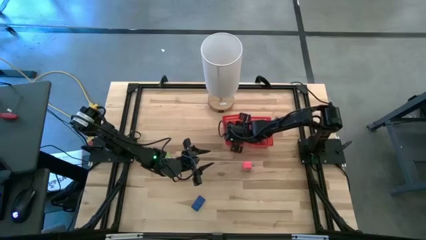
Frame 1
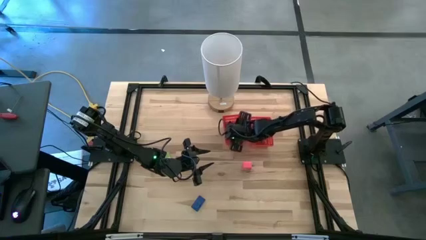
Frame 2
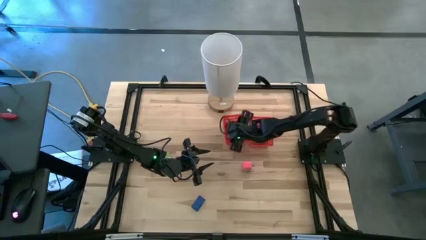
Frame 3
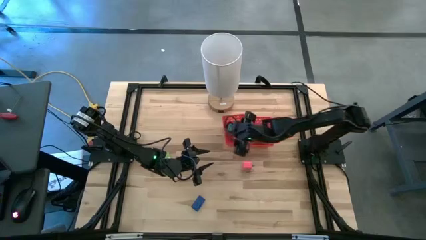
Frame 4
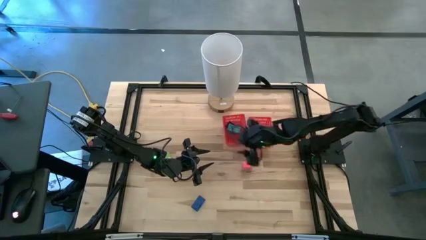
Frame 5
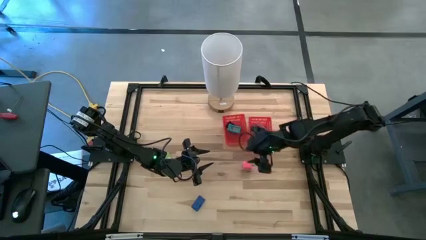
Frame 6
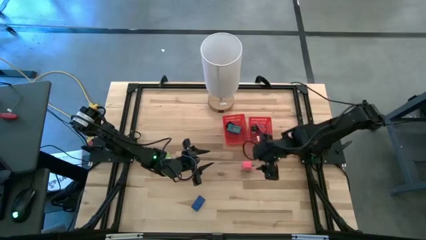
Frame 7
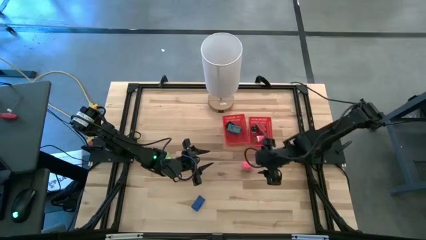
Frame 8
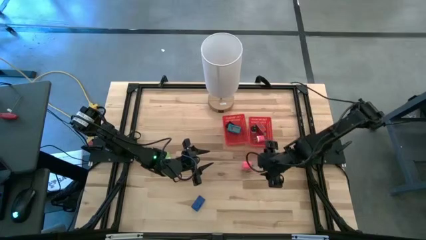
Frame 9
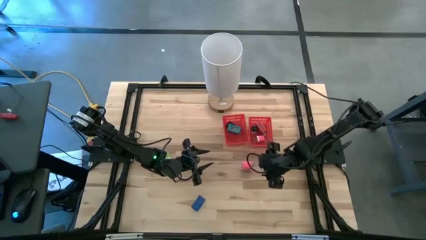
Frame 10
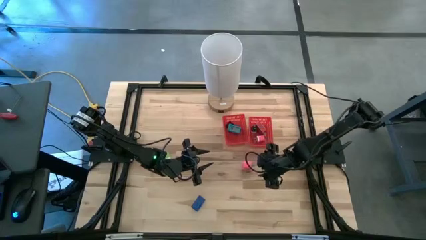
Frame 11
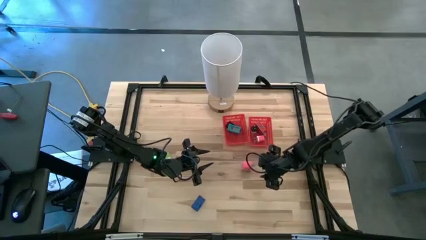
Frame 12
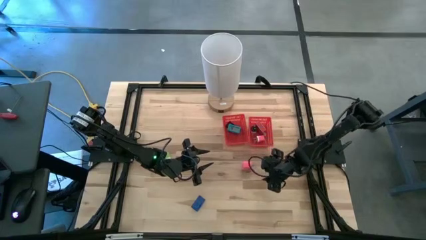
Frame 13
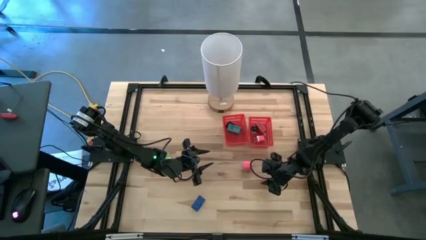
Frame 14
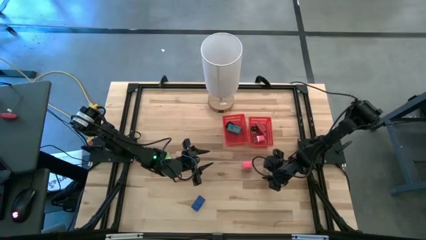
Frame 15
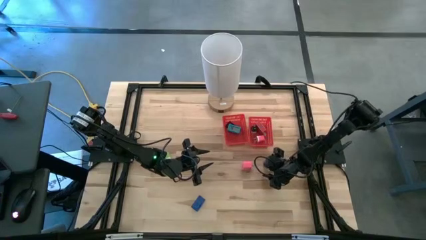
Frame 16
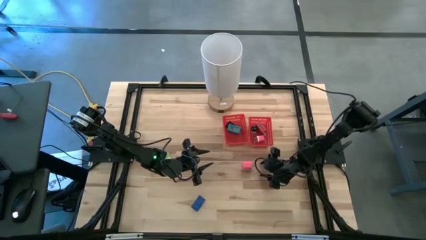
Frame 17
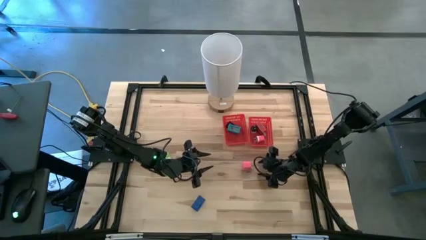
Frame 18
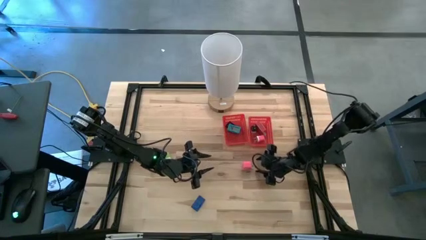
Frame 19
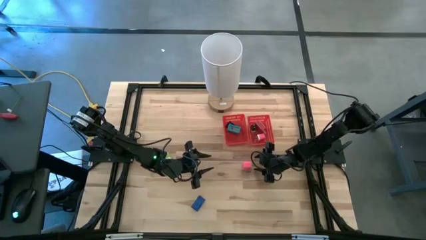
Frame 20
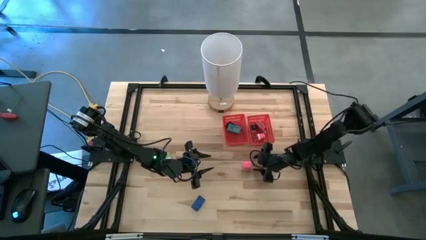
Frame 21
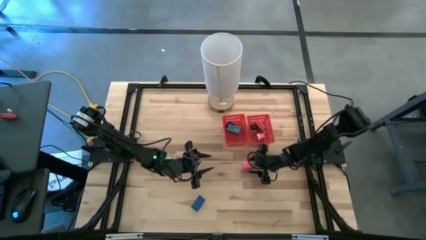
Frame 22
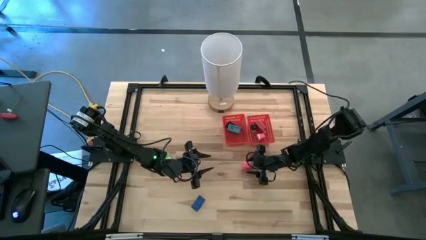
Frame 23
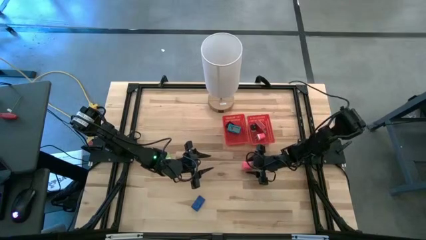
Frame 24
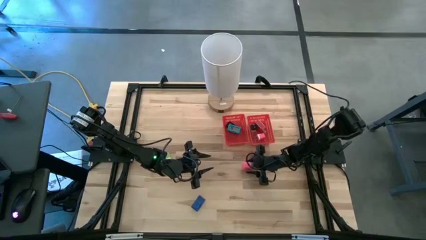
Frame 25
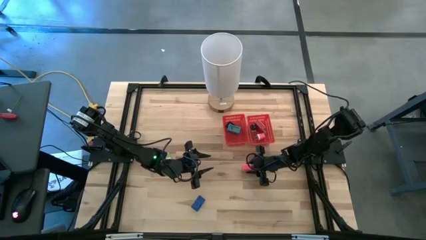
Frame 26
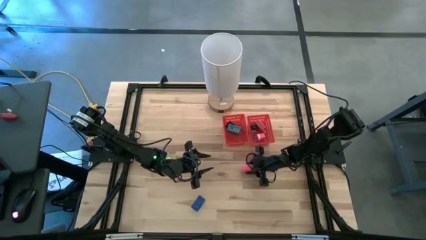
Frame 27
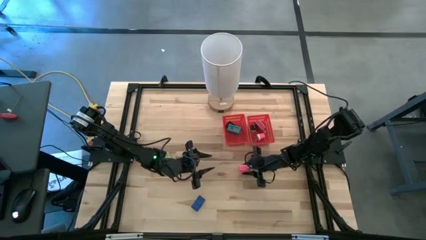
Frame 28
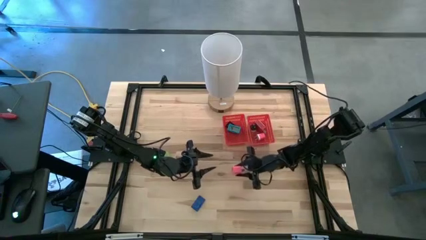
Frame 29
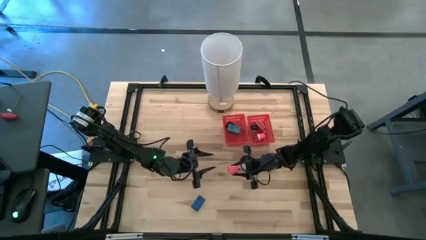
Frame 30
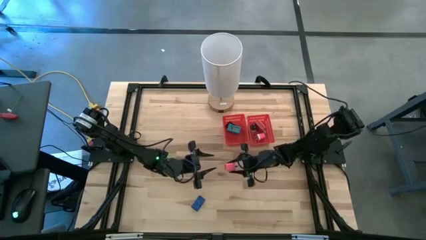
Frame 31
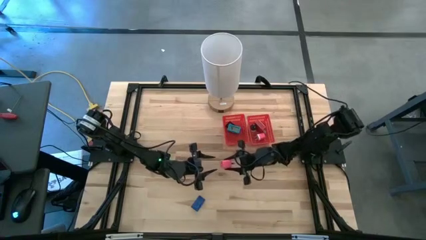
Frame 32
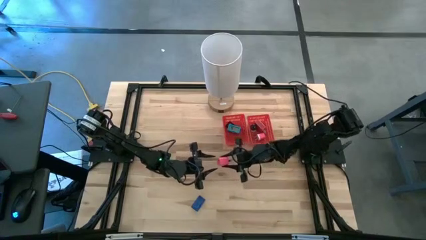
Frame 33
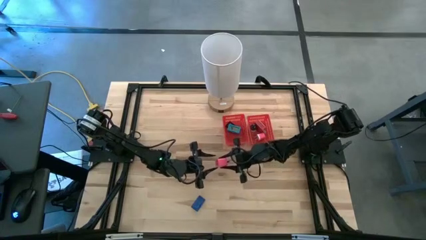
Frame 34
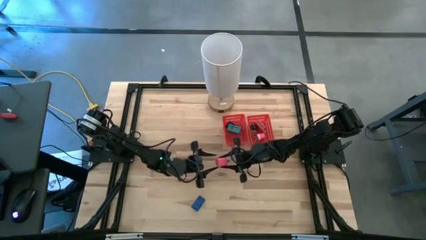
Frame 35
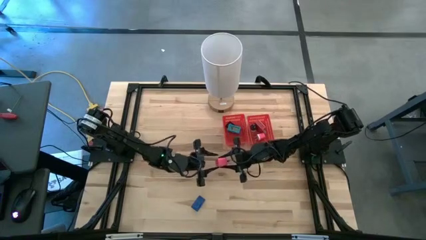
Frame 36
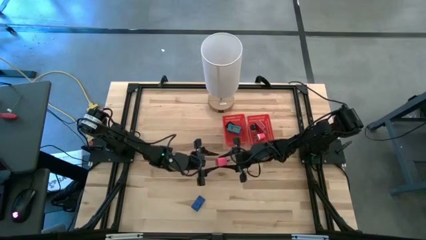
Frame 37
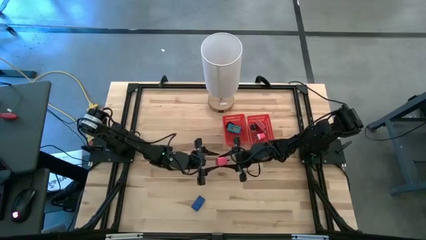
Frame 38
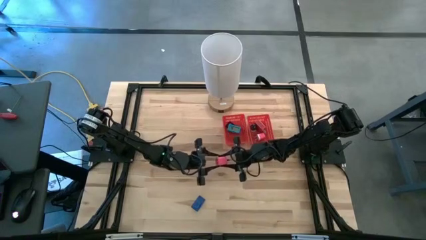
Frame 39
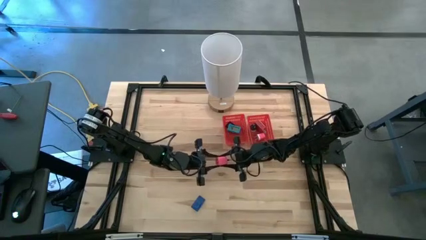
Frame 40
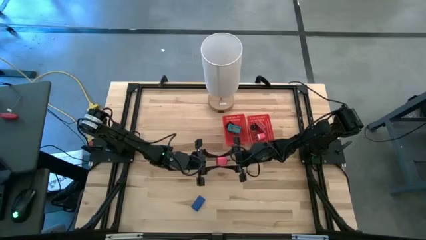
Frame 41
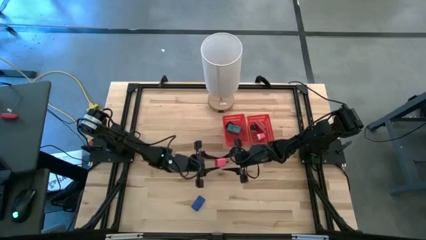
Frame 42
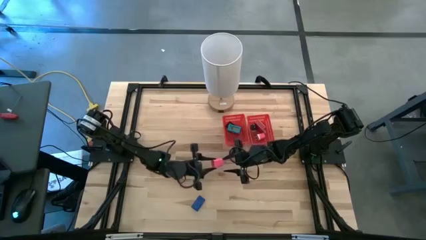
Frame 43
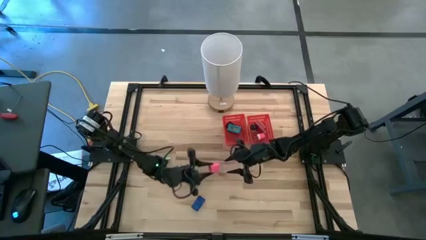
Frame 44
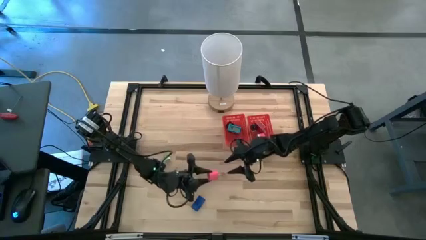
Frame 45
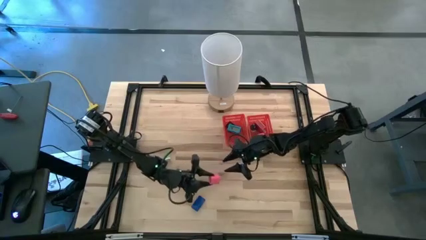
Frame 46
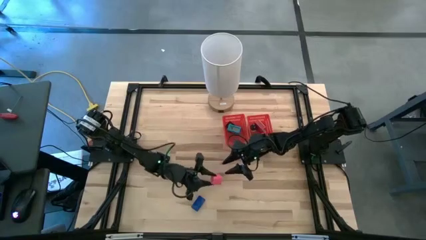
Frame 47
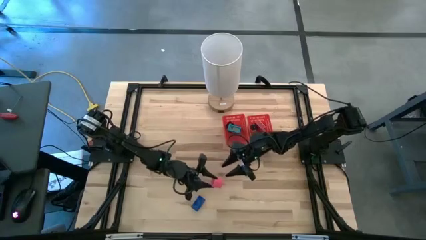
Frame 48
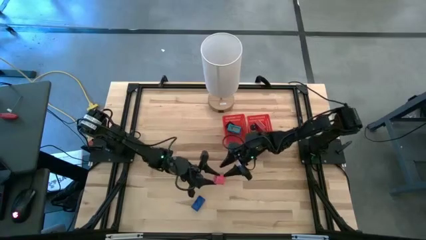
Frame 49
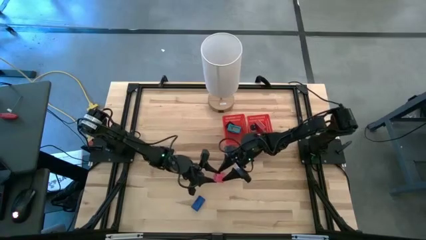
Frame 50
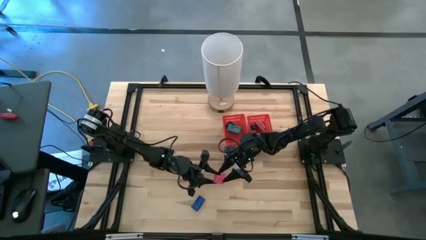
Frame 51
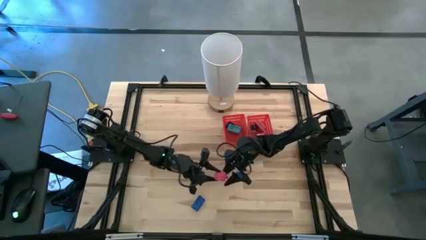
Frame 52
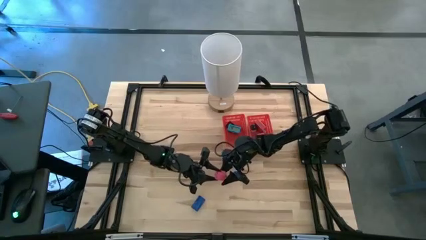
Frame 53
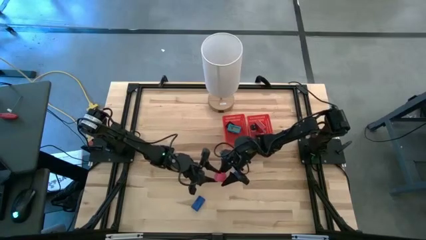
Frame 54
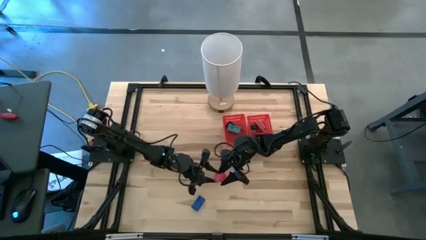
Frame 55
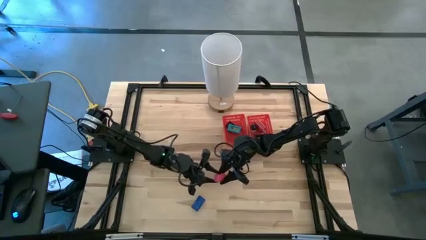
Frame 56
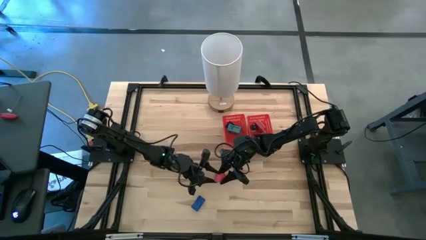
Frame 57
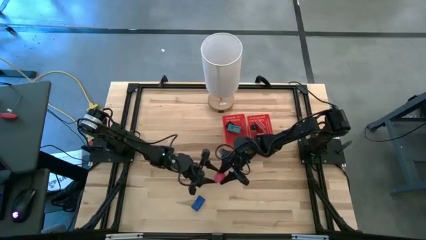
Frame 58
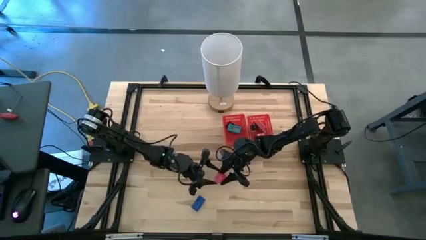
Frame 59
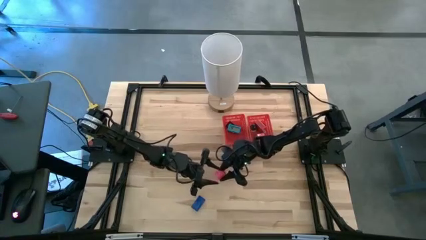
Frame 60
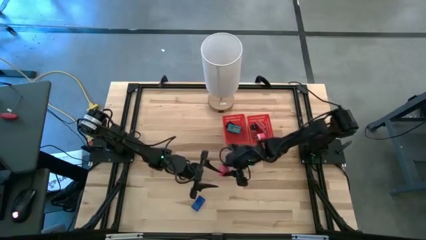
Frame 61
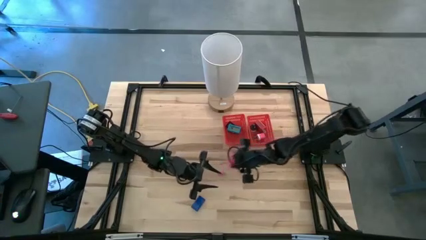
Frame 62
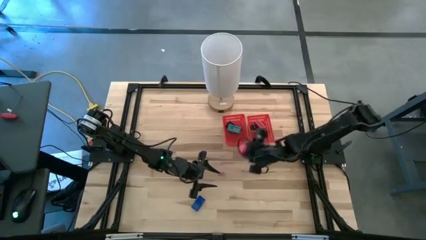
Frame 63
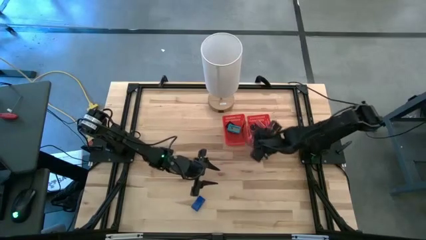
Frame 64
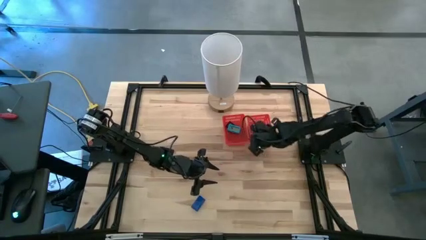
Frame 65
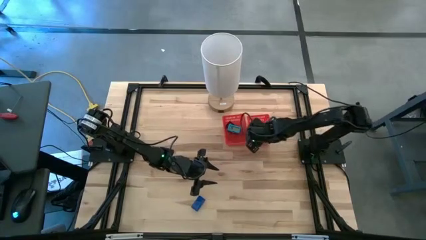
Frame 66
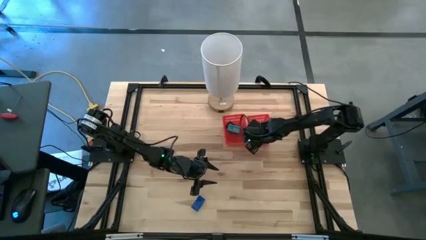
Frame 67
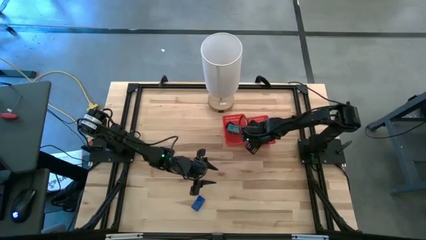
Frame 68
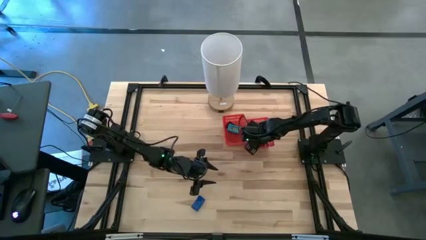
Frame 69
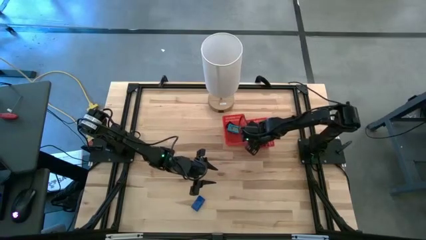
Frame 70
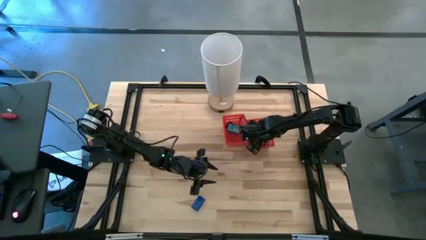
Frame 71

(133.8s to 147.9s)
Task: Pick & Place Office items
Put the pink charger adapter into the right red bin

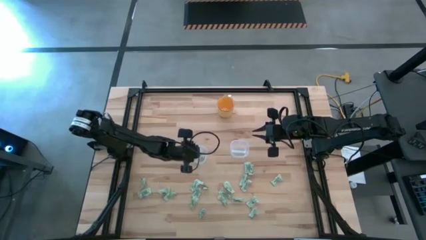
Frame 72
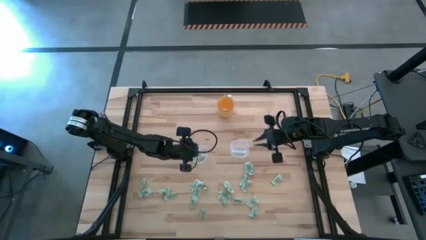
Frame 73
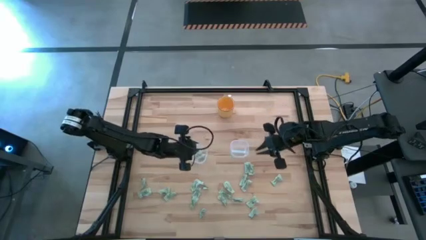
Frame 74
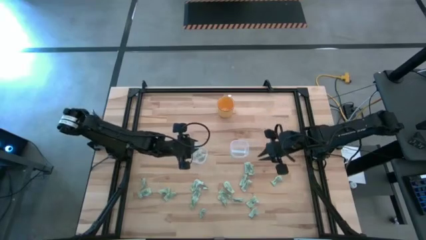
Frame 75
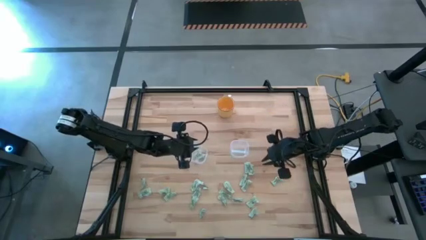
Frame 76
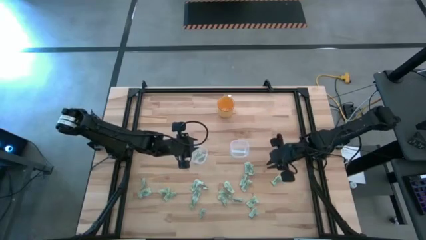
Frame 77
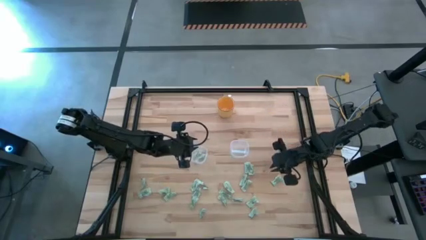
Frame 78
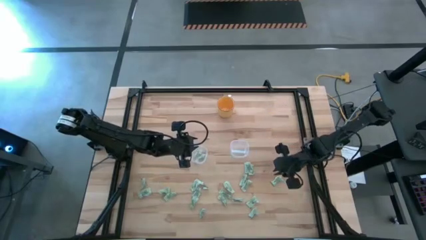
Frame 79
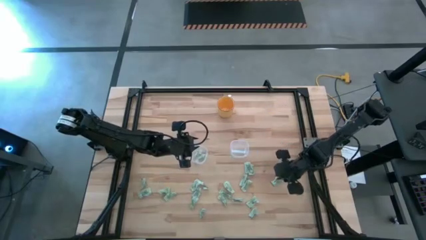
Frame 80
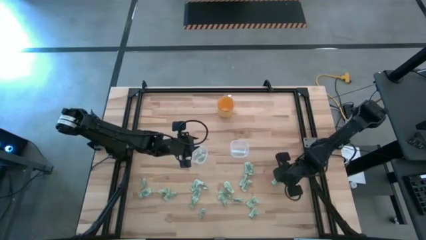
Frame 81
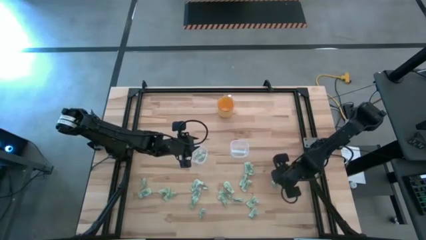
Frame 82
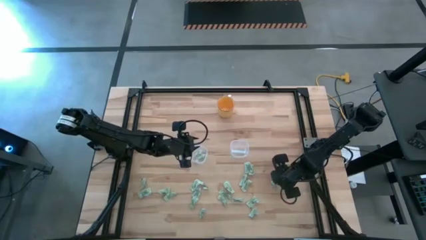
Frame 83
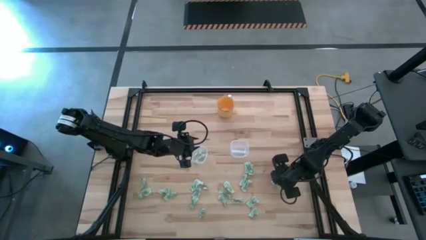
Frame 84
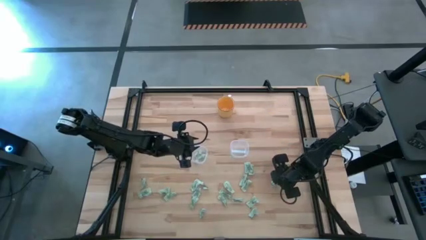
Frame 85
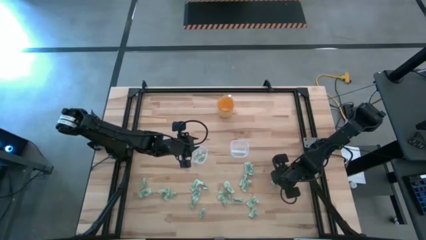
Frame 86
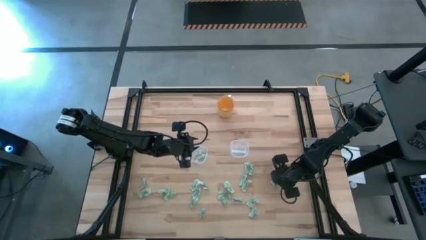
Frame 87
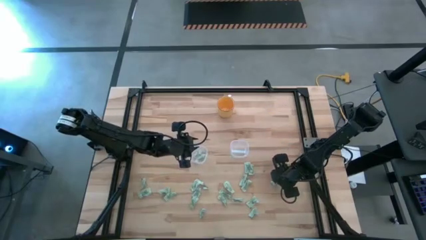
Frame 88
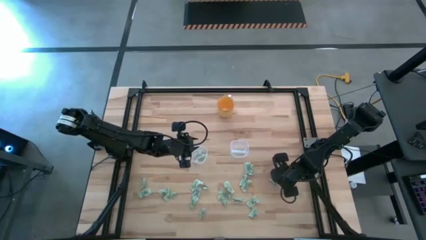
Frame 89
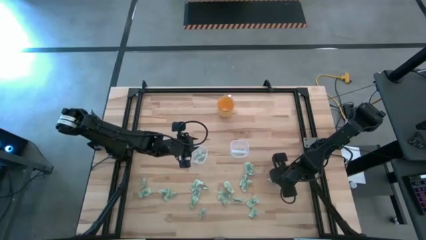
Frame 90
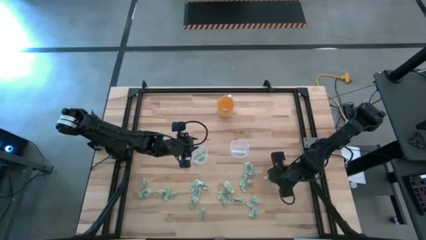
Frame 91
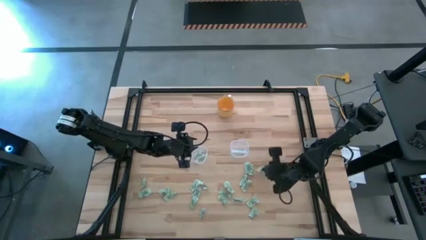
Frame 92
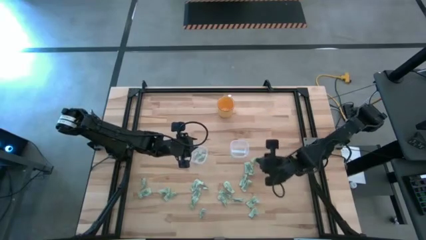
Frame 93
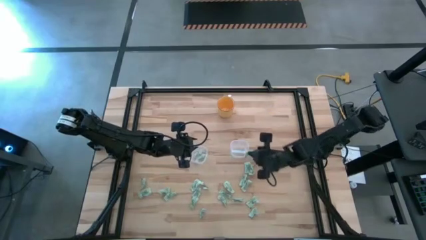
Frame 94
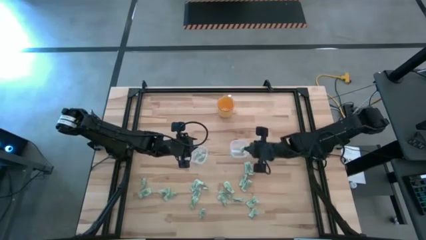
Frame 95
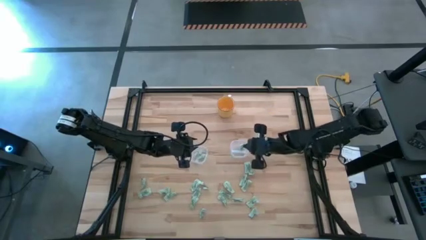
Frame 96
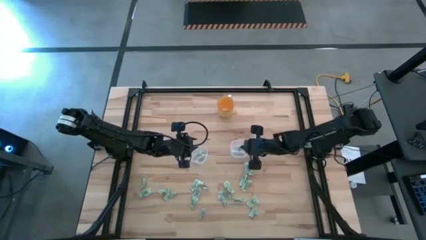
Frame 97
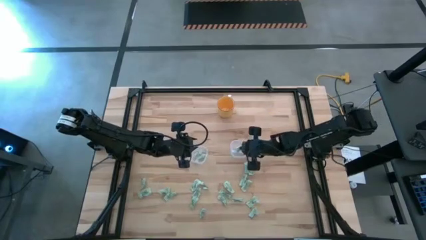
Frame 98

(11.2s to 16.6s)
Task: Pick and place items into bin
Put the green sweetener bag into the right transparent food container
